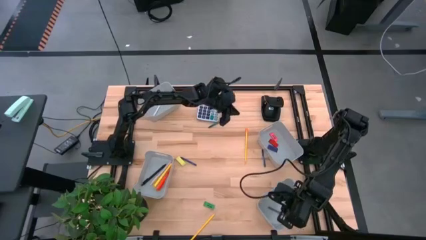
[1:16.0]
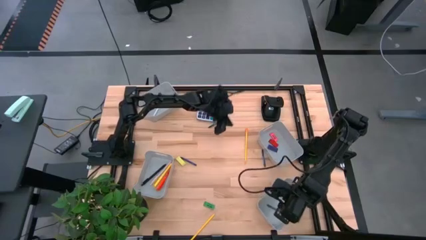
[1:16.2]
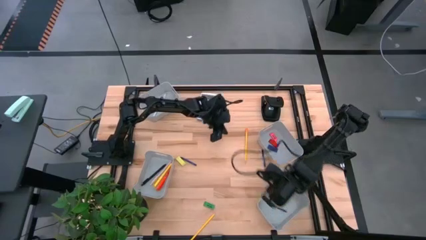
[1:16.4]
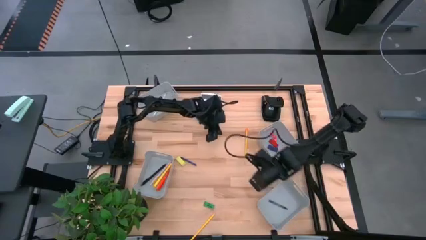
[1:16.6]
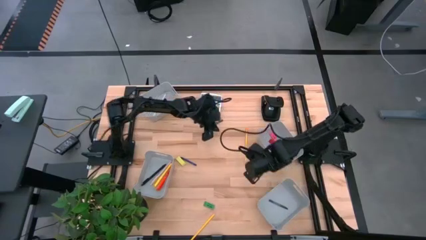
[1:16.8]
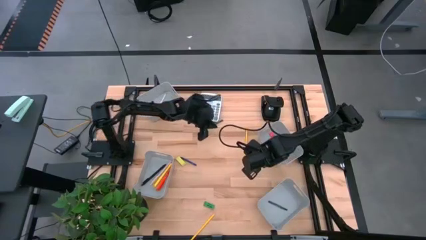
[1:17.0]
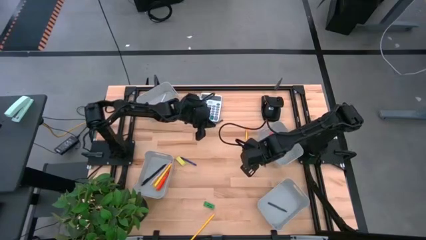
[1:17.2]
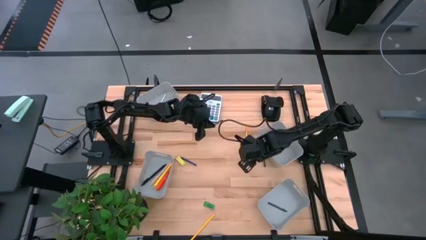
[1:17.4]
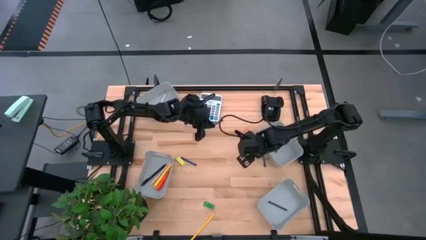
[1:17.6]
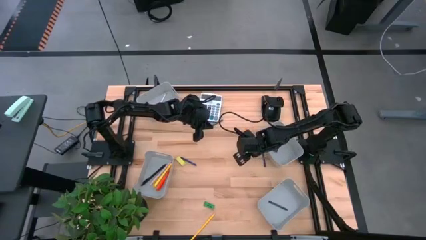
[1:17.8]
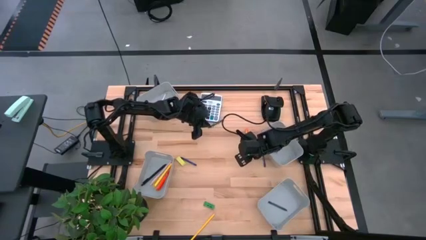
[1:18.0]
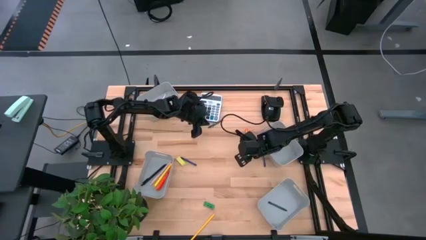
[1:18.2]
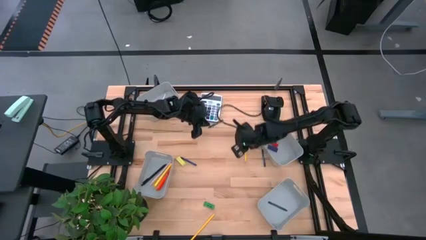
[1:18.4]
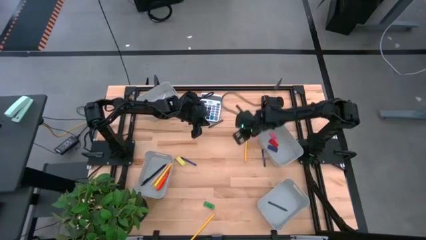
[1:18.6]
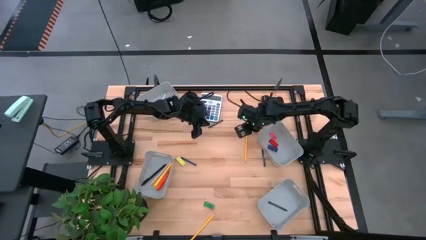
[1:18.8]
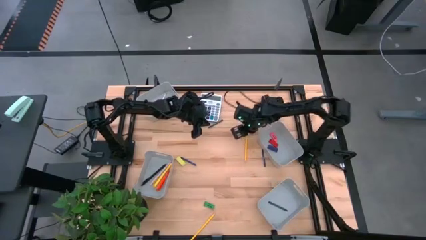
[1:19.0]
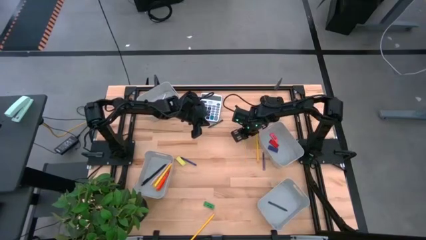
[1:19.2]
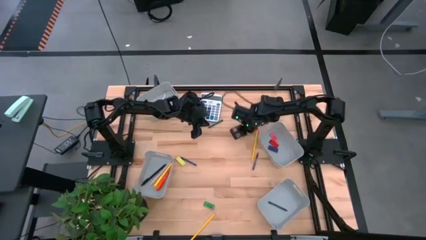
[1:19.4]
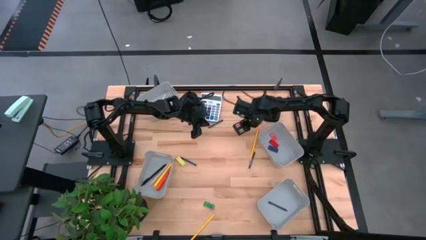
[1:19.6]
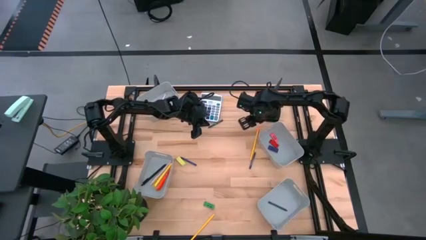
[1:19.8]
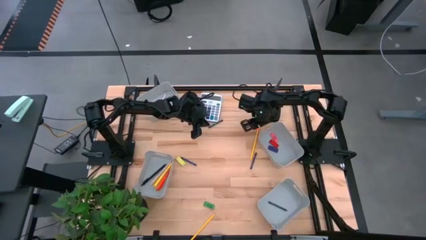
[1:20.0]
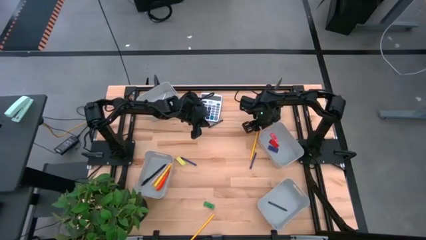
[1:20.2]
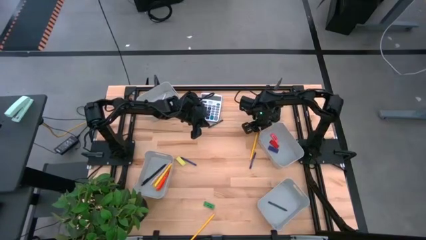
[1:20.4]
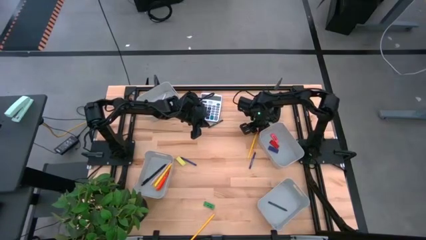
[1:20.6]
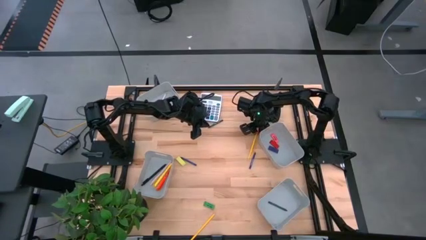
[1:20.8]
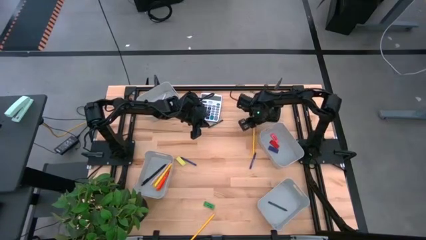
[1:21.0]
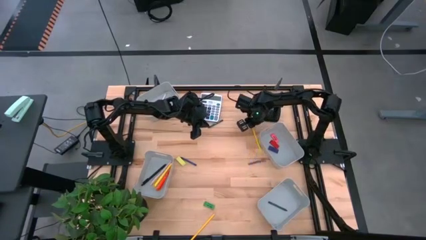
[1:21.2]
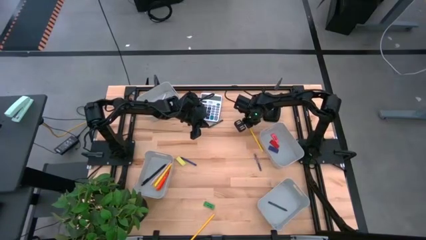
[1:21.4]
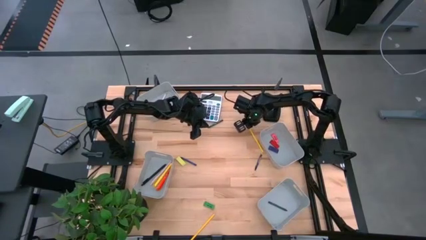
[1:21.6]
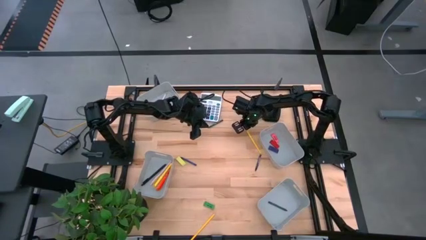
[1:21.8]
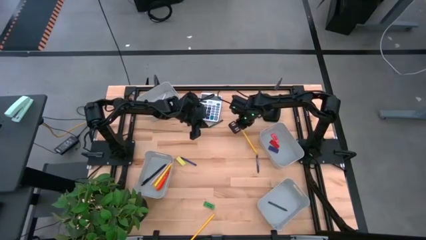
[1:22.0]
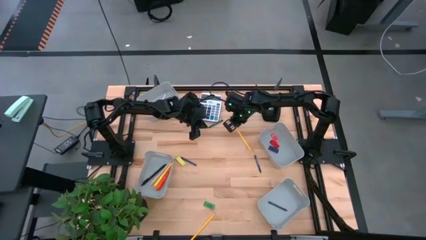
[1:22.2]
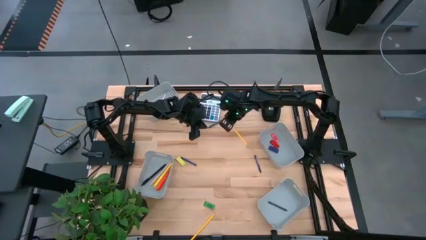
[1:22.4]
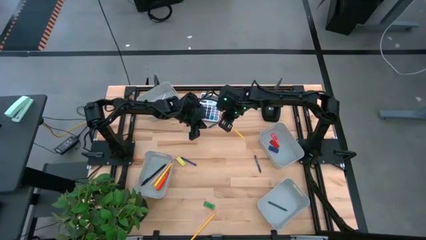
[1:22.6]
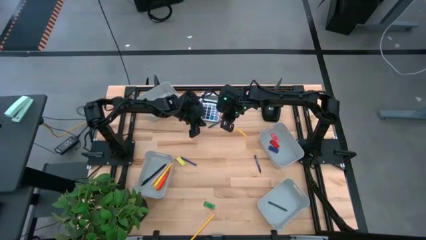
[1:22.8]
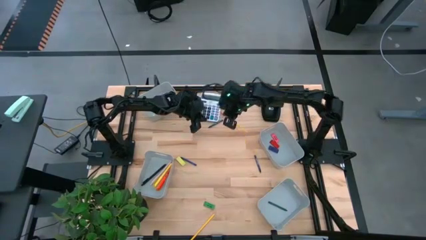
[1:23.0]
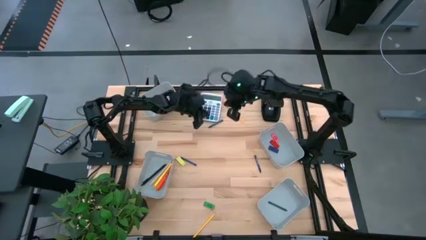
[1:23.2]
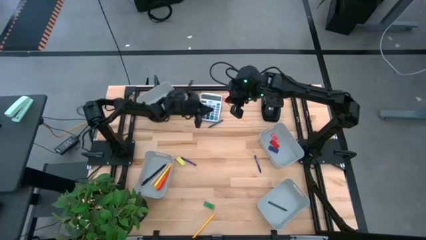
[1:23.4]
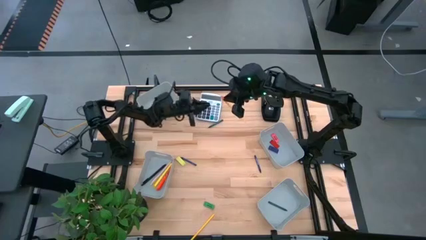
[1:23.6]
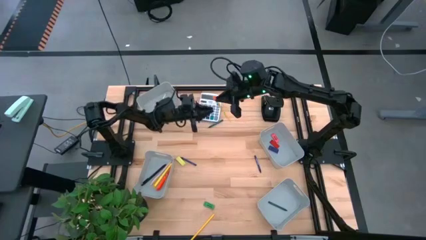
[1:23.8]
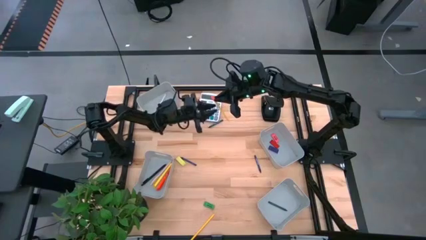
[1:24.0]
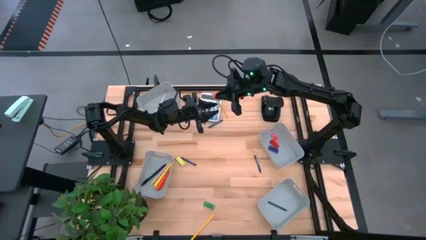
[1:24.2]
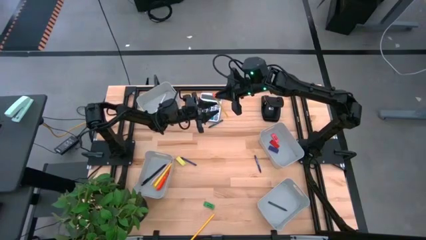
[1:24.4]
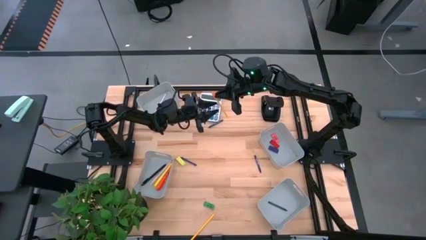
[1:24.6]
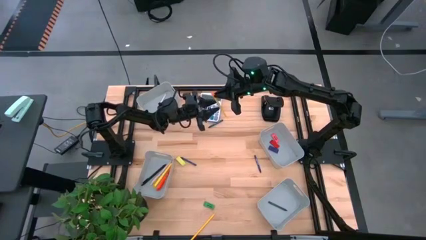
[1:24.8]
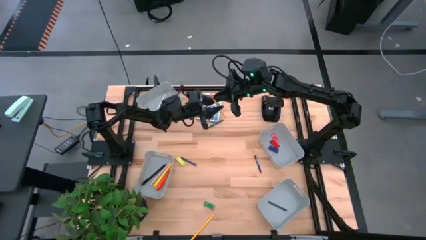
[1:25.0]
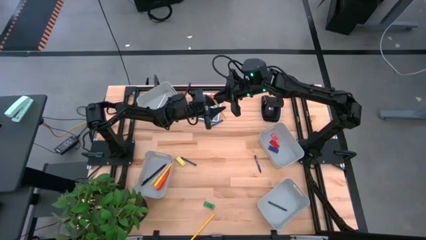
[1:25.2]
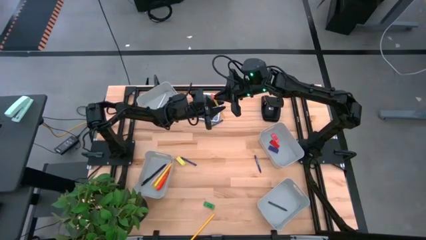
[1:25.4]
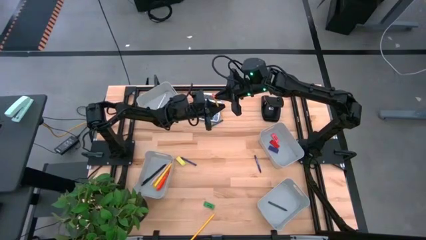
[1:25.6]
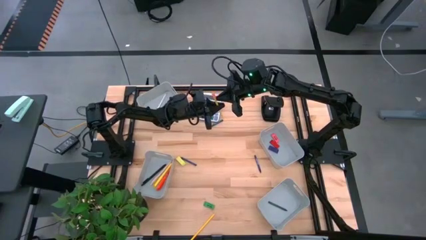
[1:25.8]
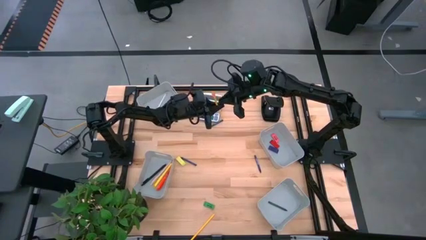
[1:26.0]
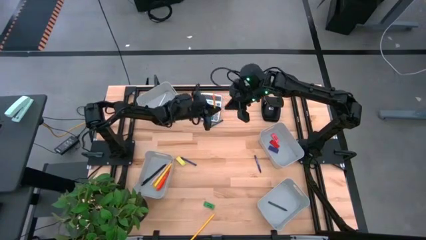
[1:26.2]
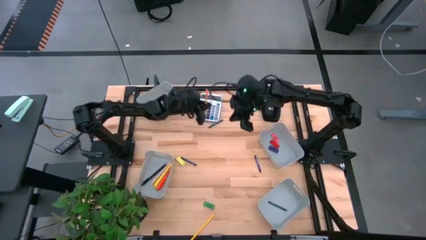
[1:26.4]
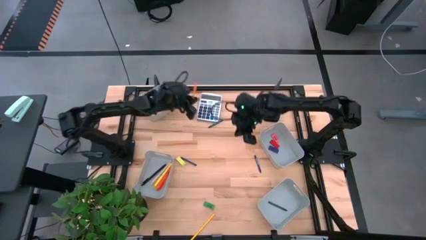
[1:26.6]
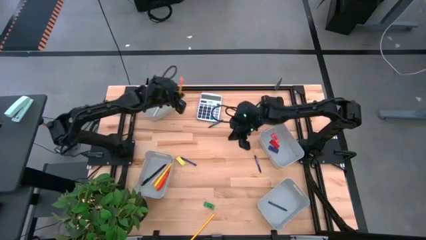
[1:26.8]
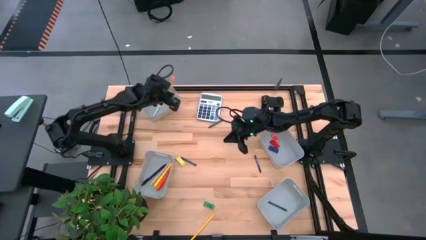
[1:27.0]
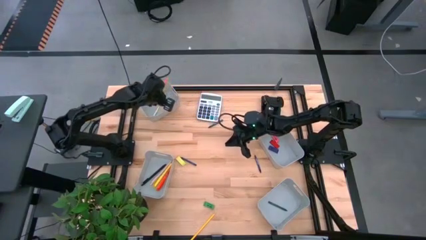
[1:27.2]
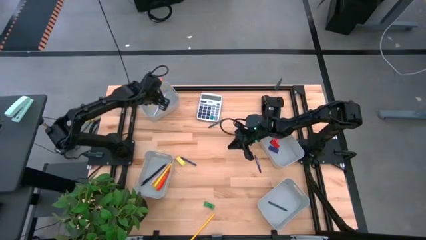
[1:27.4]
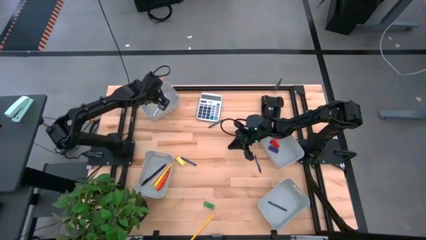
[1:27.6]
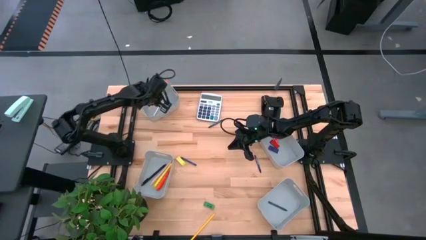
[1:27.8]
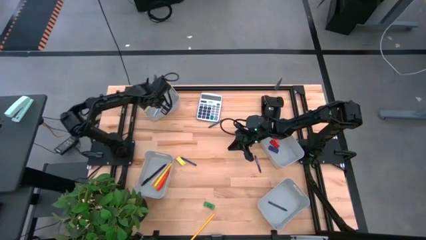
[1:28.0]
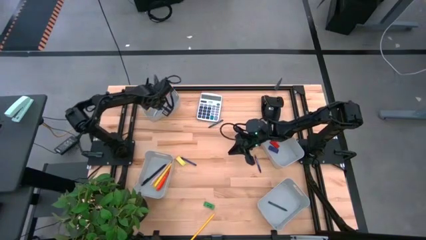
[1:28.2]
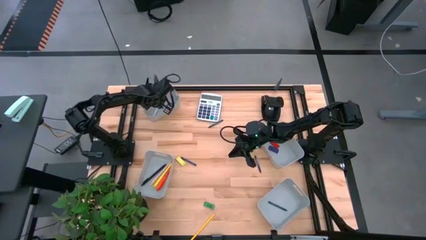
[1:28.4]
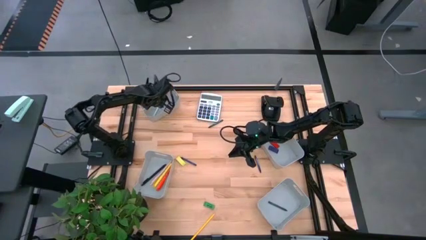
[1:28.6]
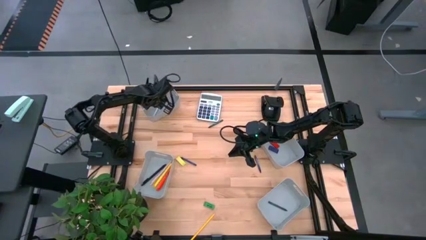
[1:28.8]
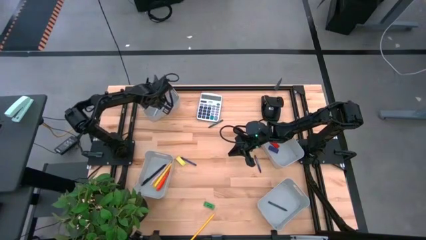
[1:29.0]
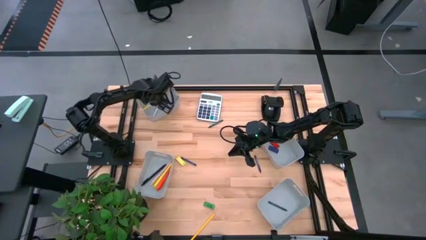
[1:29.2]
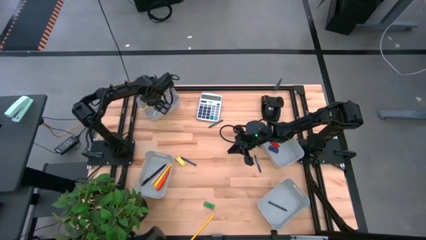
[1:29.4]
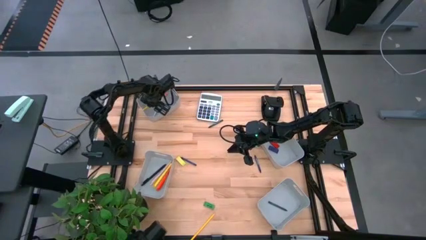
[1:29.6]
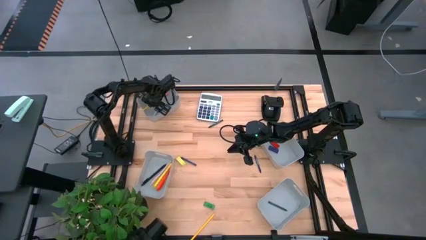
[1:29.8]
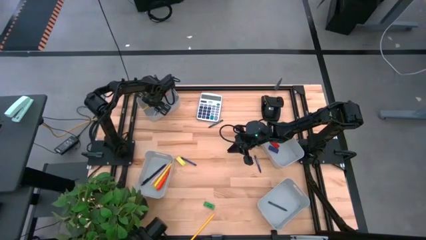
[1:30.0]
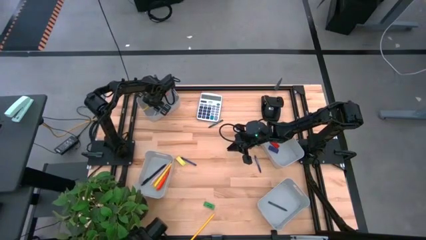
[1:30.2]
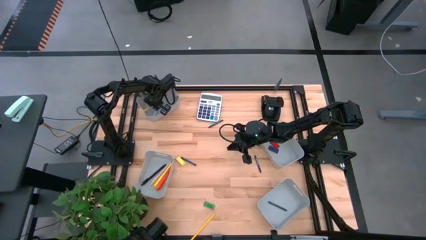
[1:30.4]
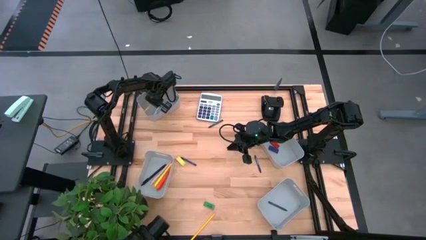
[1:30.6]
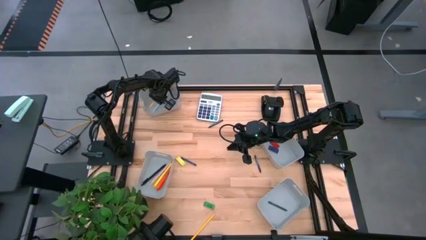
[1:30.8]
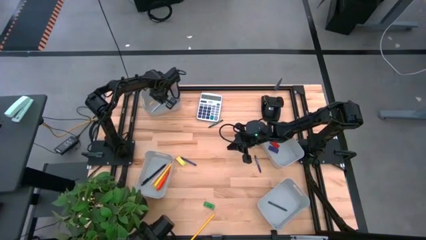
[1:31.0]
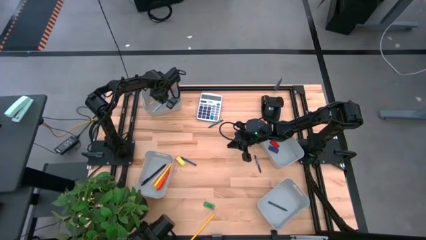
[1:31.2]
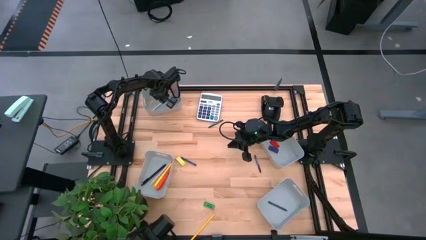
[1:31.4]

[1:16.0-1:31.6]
Task: Sort crayons/erasers/pens/pencils in bins
Put the top yellow pencil into the top left gray bin
